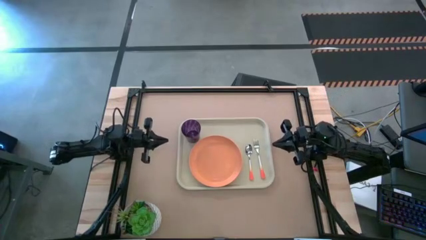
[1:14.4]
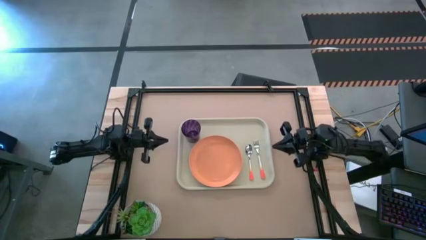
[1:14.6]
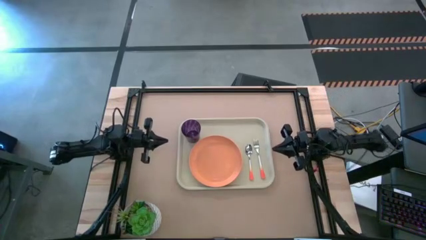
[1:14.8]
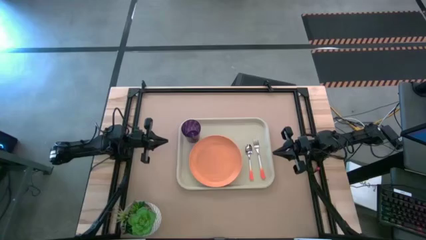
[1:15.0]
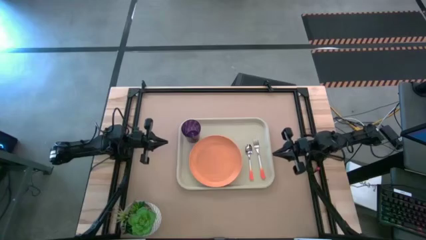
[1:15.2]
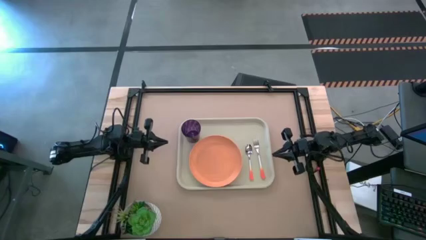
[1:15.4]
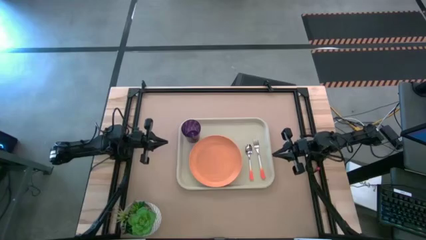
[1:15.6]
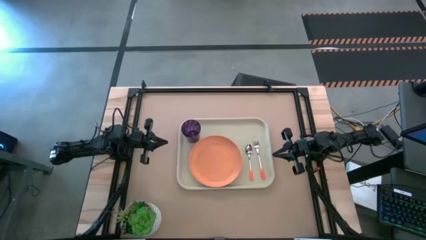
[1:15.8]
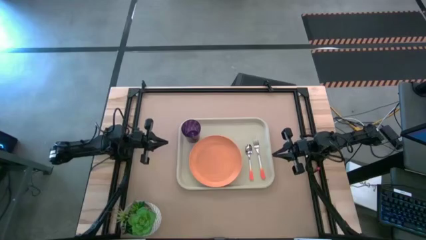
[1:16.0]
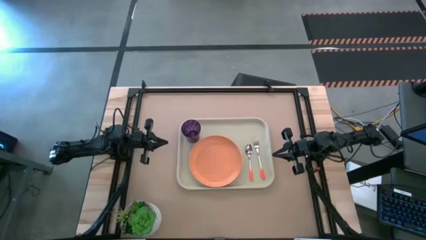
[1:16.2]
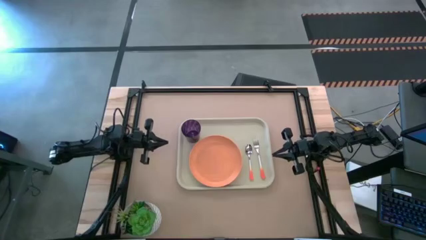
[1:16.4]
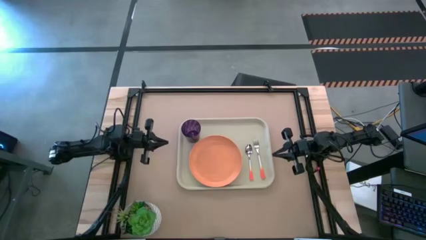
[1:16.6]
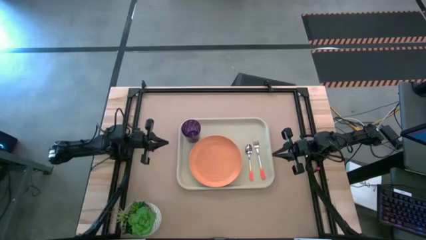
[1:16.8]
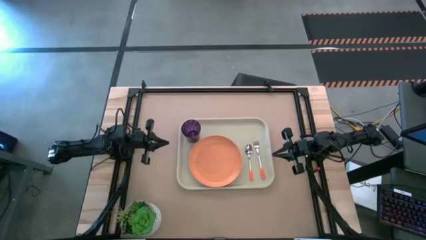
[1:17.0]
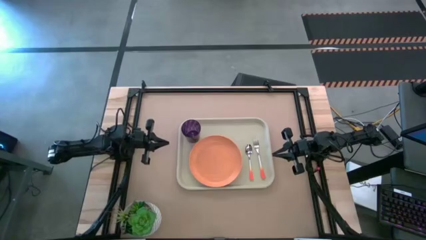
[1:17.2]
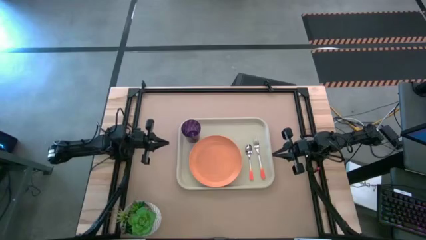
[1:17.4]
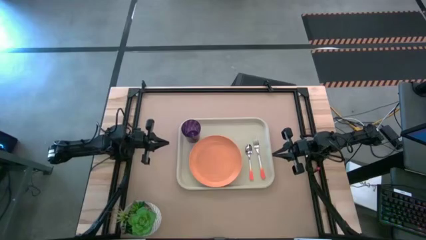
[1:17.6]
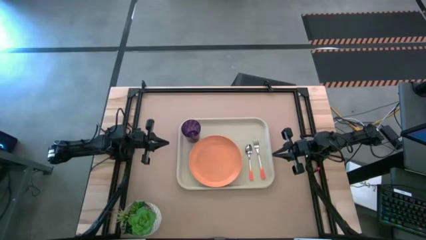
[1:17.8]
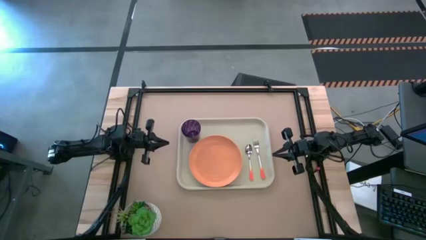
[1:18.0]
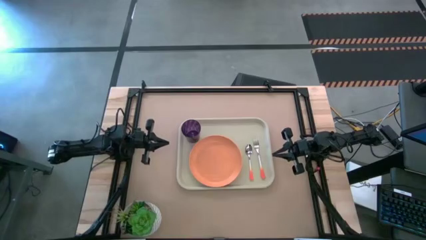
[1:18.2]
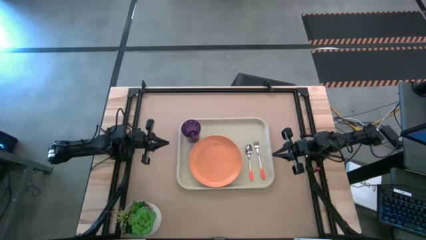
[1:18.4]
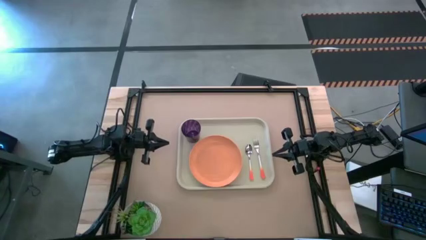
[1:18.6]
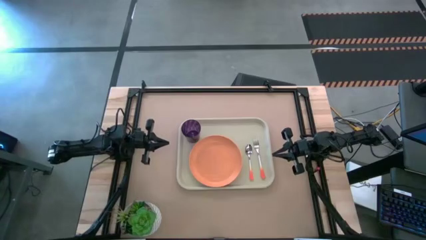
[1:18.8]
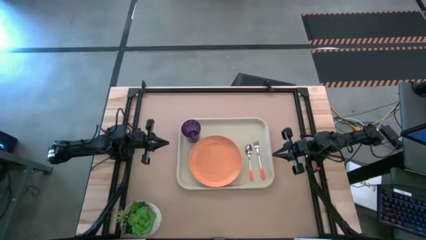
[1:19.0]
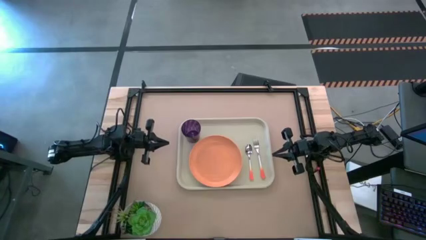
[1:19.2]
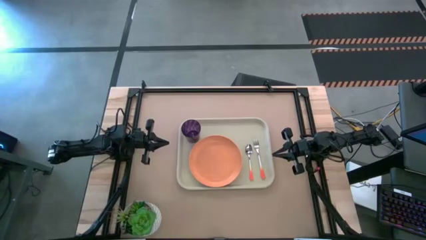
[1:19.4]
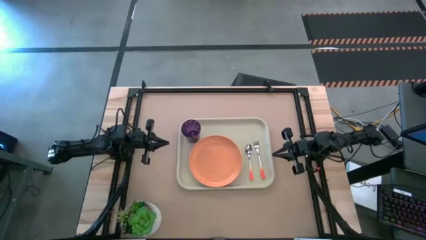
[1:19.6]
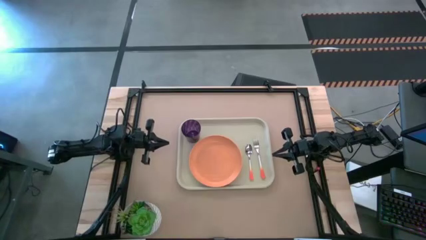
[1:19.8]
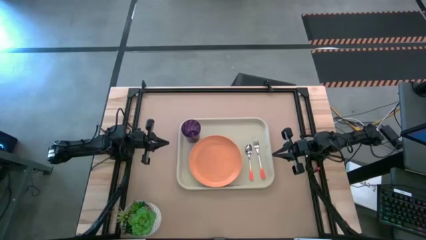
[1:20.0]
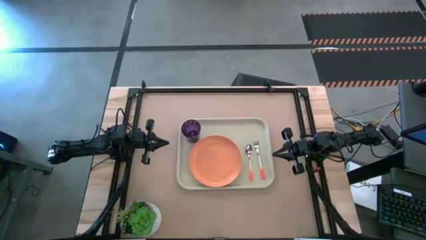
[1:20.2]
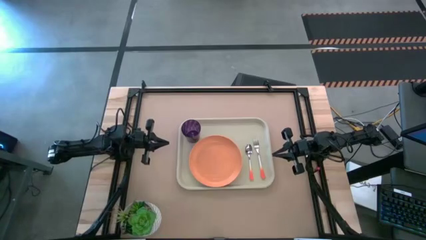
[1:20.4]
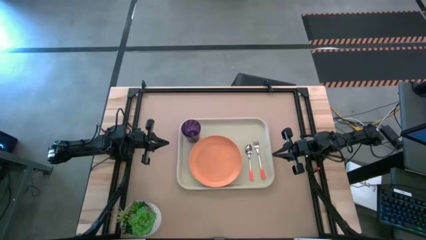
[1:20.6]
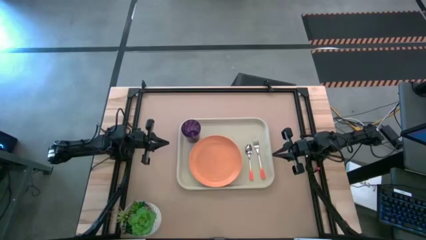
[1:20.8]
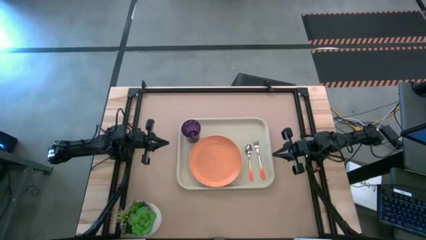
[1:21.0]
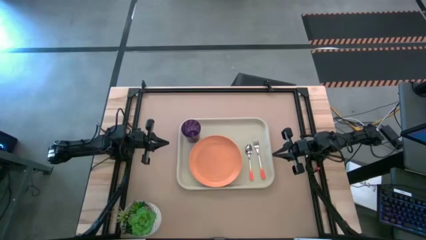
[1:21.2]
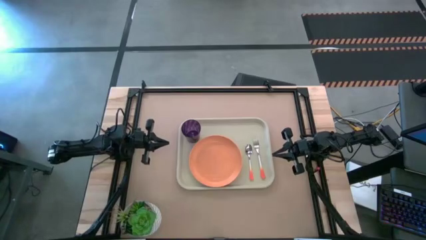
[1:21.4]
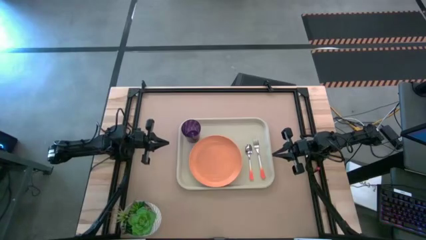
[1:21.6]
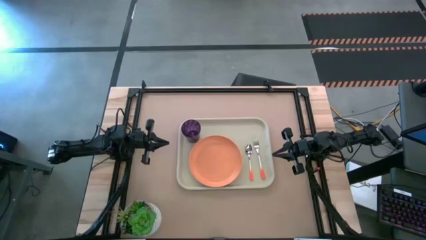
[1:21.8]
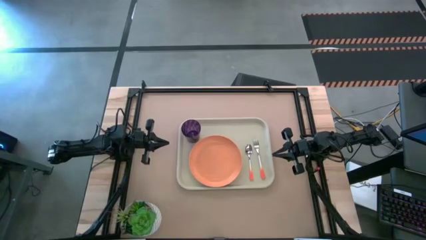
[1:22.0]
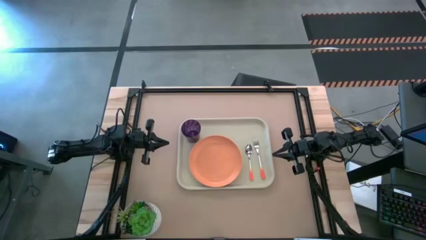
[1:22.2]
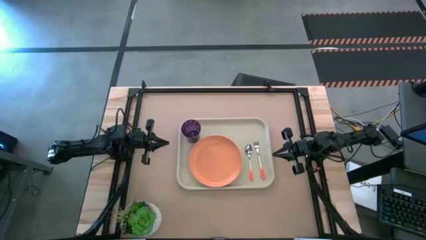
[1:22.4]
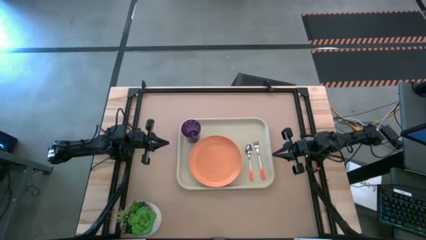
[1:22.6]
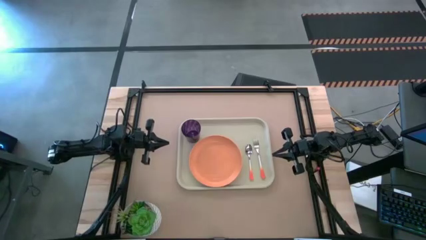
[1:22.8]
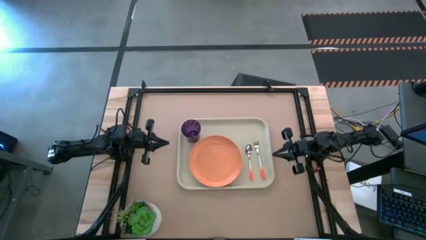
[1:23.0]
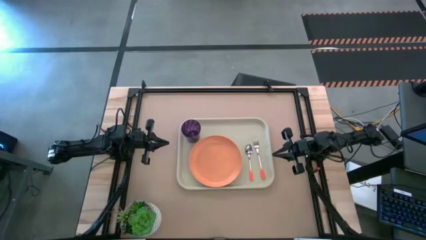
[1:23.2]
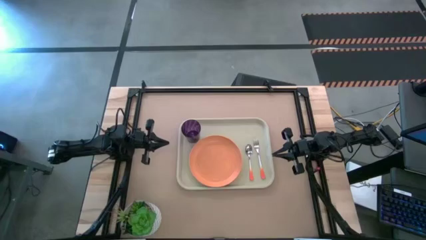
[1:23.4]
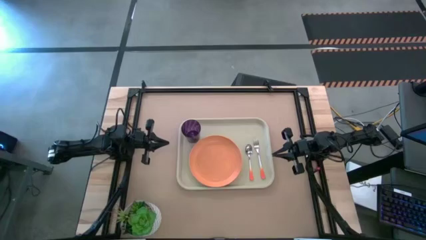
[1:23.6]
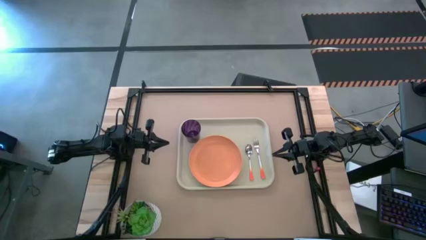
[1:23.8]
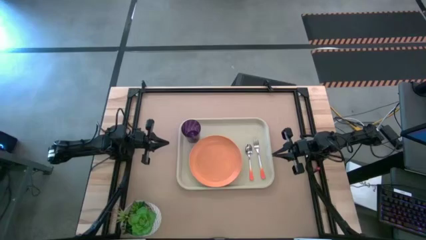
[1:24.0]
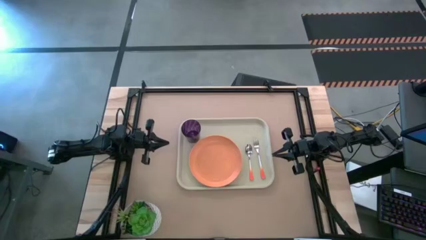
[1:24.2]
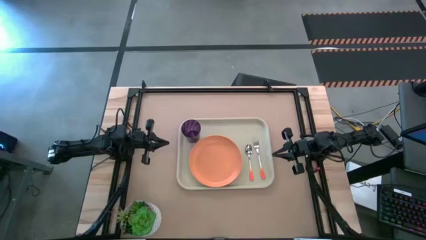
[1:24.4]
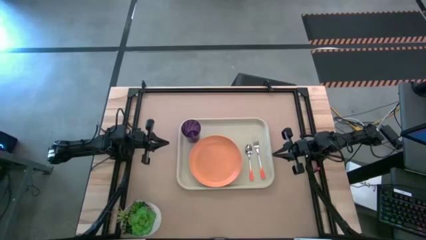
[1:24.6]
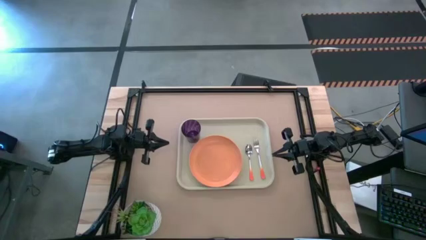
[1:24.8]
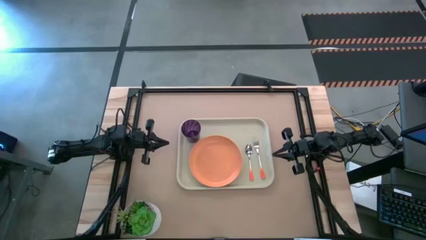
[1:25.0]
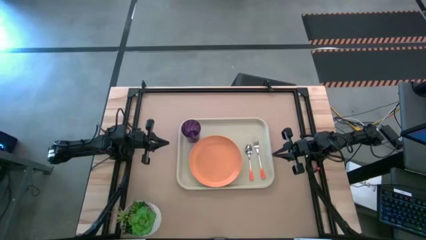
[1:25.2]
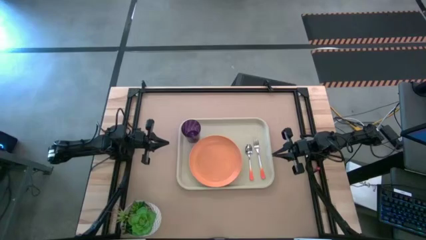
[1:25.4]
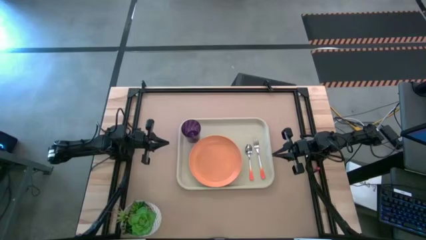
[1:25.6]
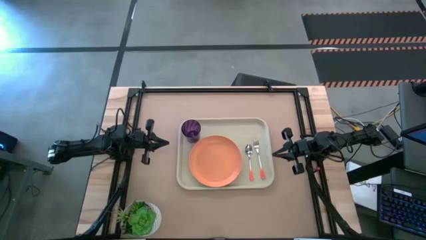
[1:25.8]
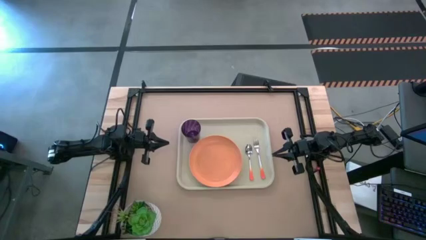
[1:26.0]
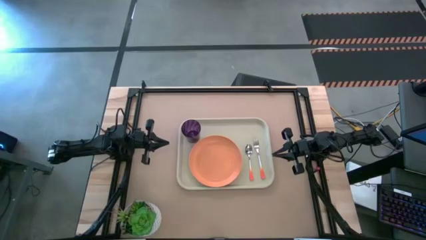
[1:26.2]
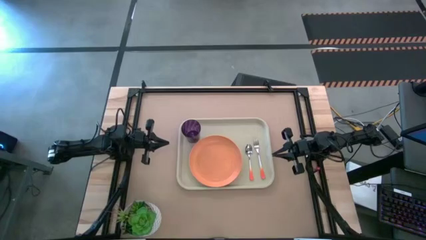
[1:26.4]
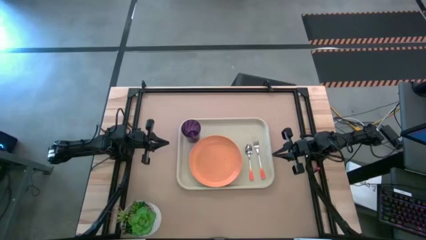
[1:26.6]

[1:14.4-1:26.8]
Task: Pick and place plate/cup/fork/spoon on tray
Return to Home Position
